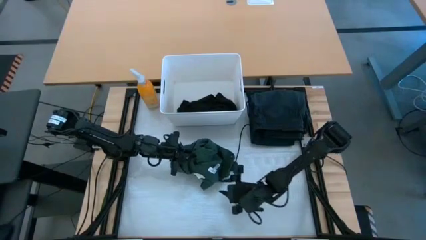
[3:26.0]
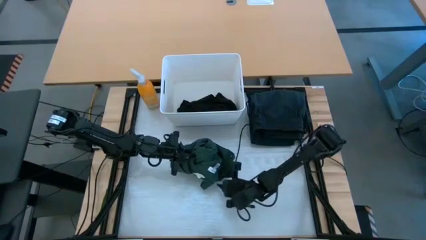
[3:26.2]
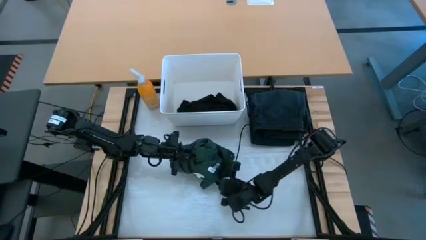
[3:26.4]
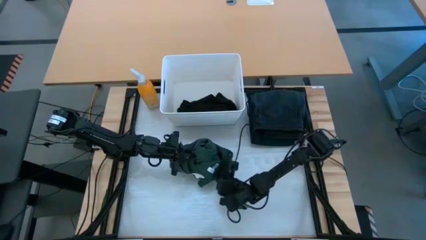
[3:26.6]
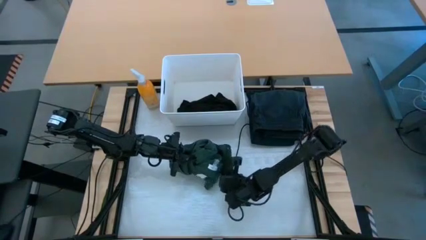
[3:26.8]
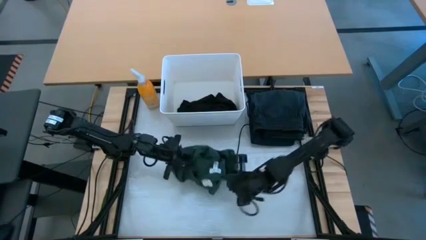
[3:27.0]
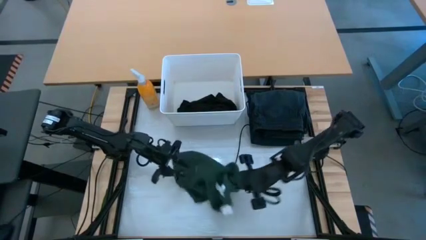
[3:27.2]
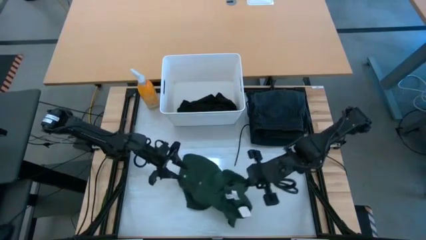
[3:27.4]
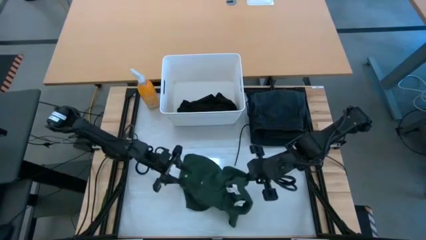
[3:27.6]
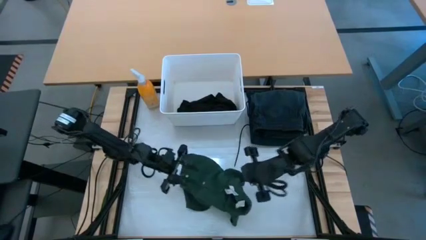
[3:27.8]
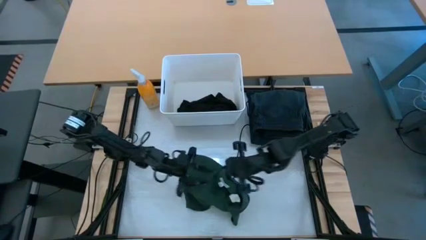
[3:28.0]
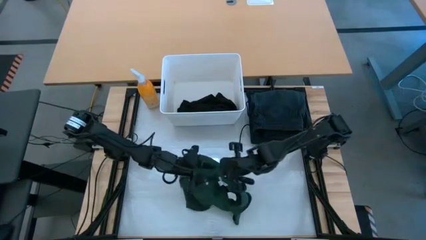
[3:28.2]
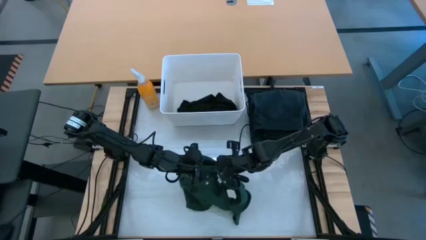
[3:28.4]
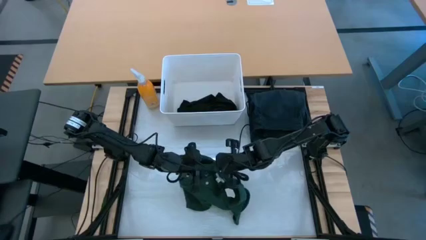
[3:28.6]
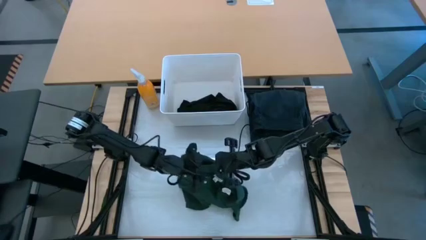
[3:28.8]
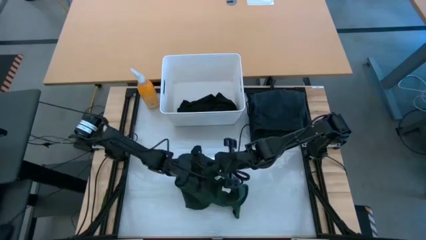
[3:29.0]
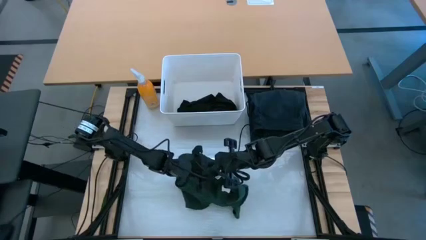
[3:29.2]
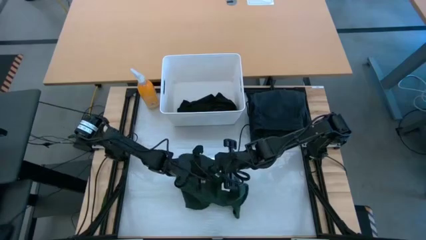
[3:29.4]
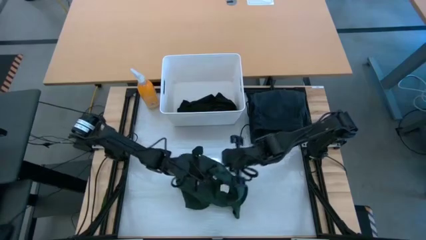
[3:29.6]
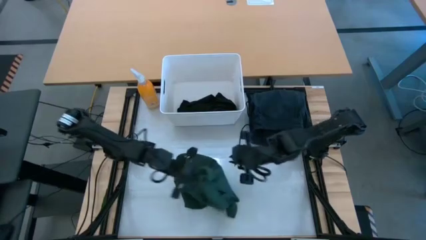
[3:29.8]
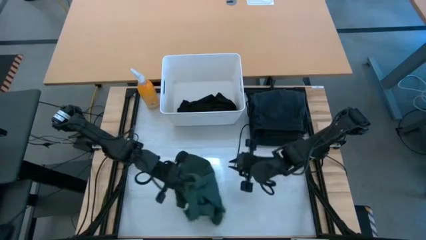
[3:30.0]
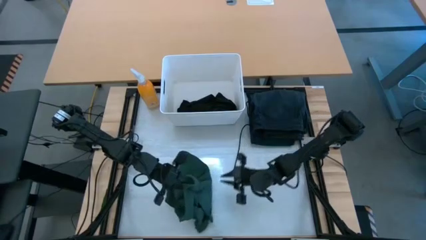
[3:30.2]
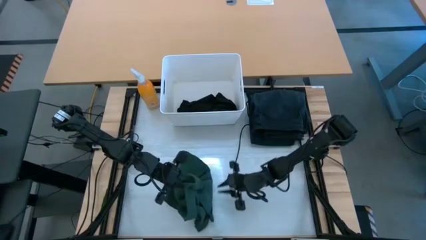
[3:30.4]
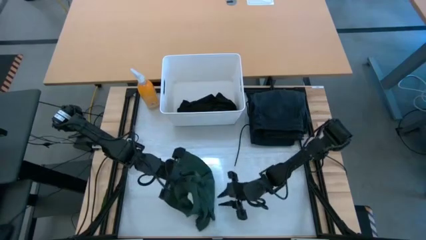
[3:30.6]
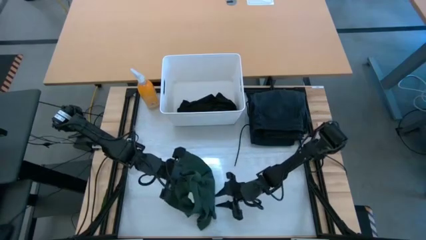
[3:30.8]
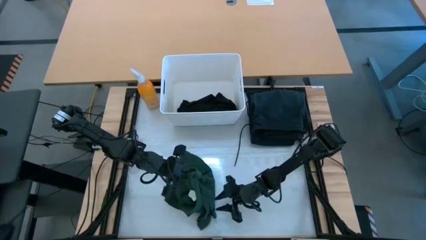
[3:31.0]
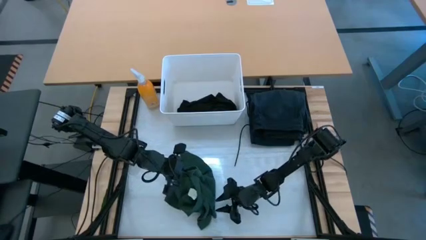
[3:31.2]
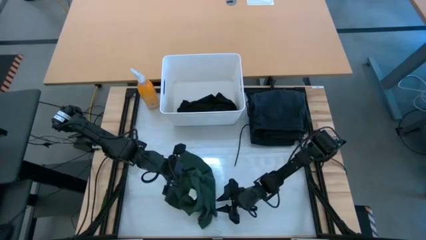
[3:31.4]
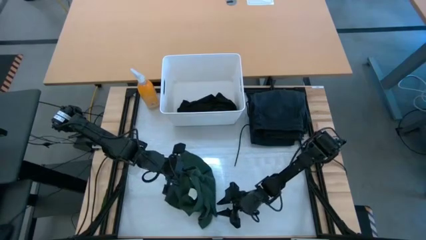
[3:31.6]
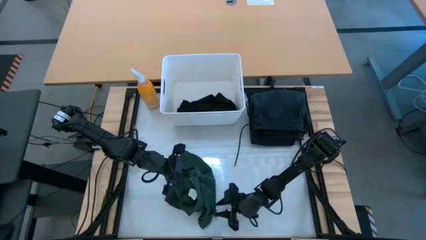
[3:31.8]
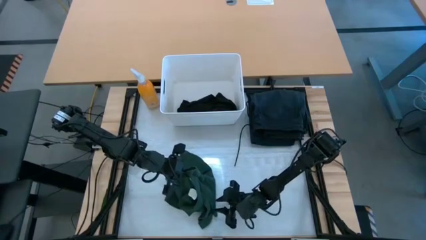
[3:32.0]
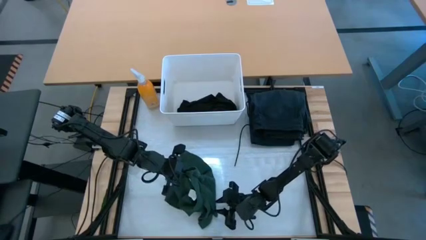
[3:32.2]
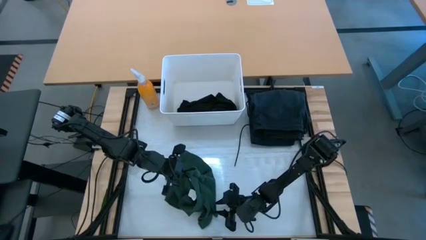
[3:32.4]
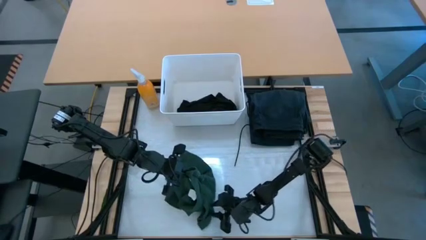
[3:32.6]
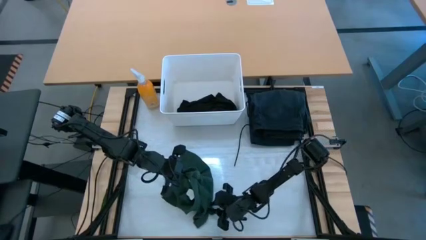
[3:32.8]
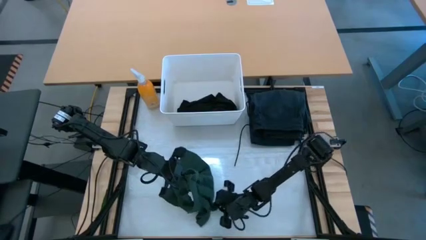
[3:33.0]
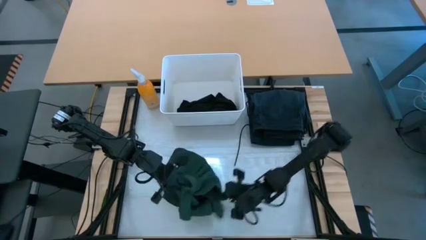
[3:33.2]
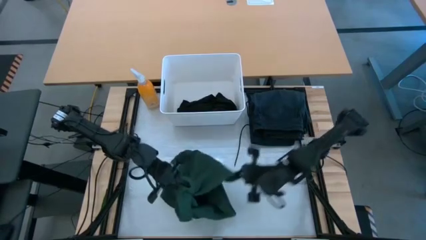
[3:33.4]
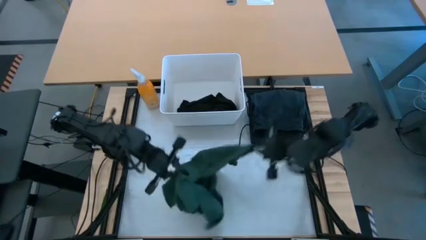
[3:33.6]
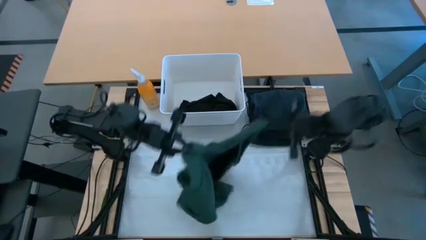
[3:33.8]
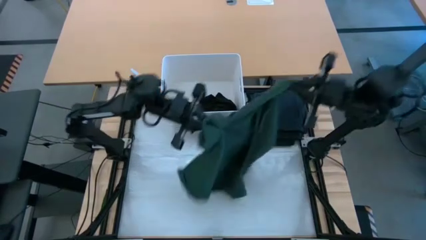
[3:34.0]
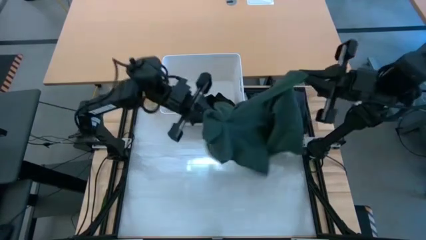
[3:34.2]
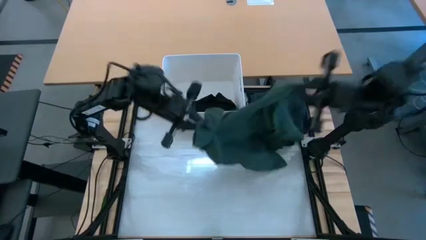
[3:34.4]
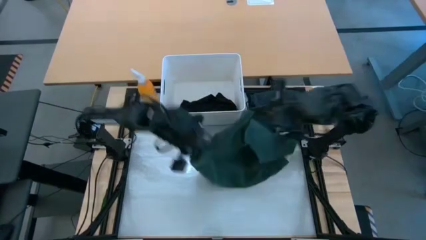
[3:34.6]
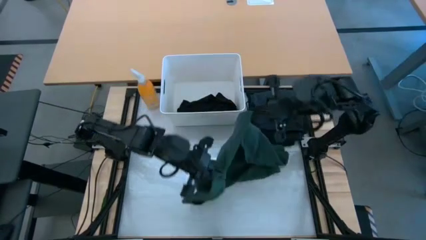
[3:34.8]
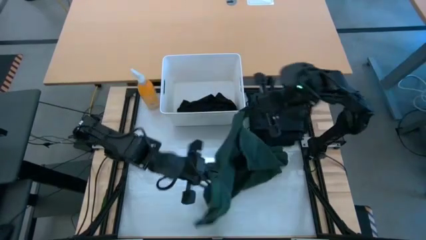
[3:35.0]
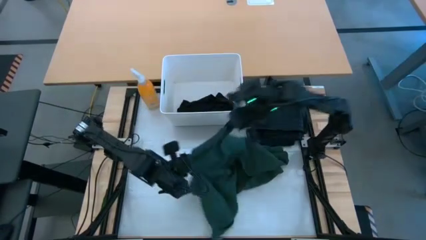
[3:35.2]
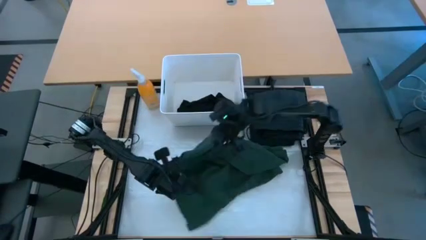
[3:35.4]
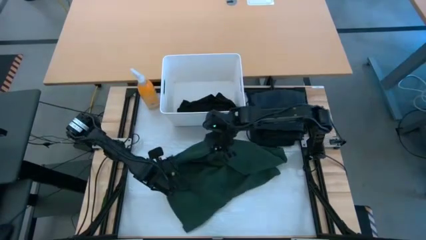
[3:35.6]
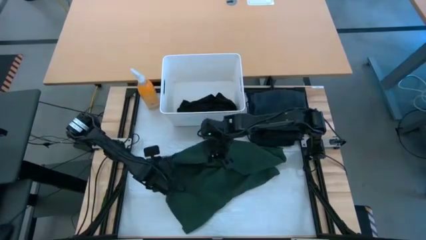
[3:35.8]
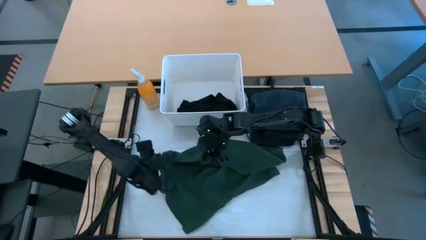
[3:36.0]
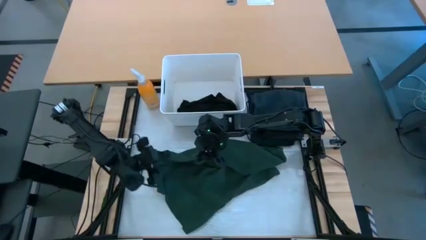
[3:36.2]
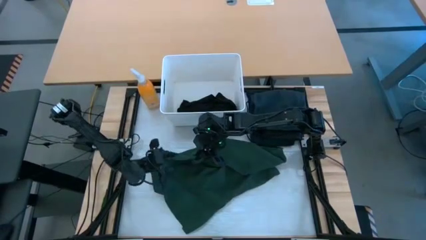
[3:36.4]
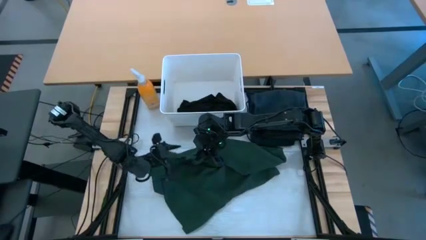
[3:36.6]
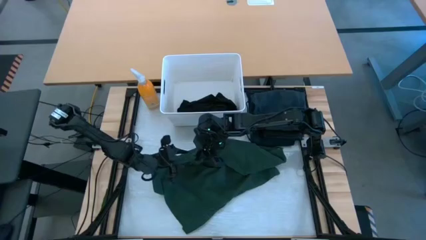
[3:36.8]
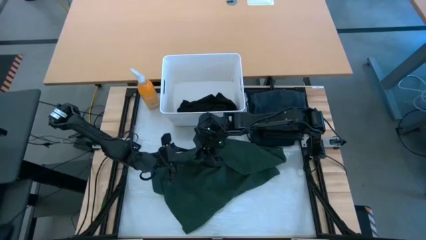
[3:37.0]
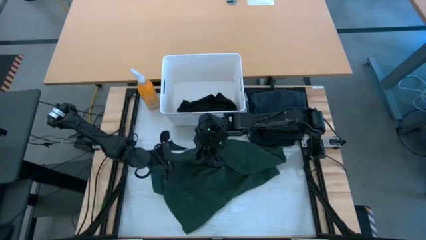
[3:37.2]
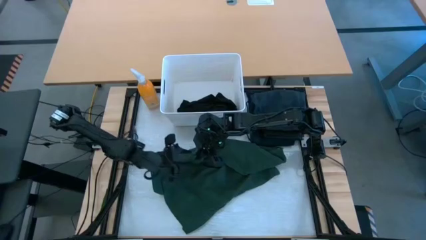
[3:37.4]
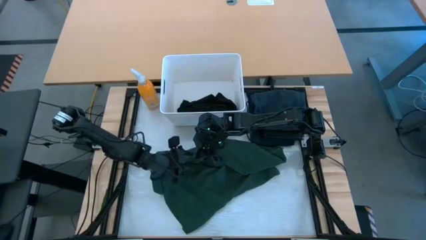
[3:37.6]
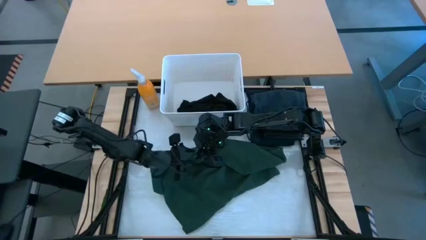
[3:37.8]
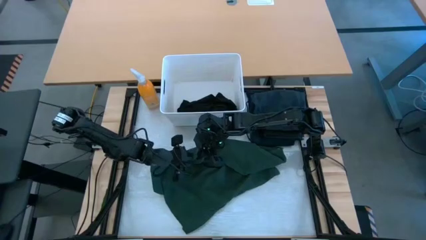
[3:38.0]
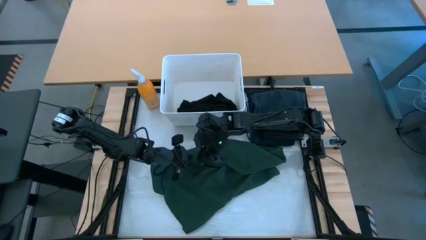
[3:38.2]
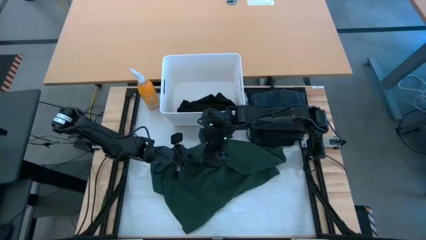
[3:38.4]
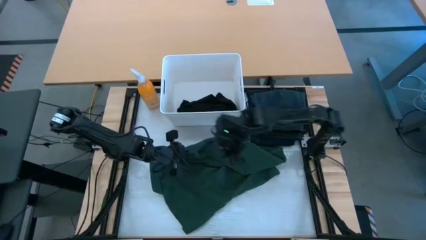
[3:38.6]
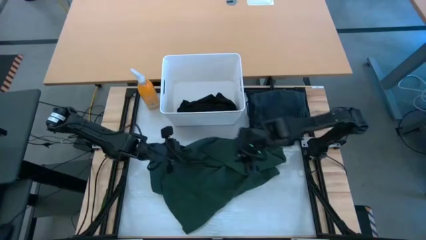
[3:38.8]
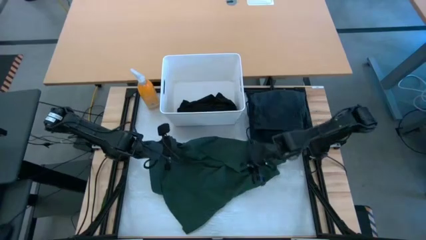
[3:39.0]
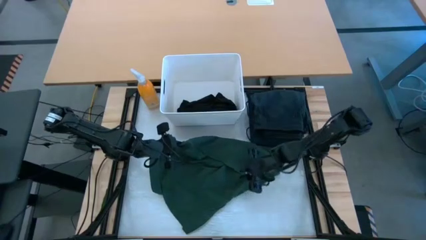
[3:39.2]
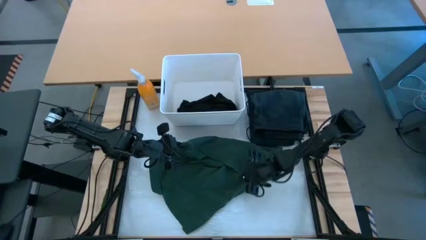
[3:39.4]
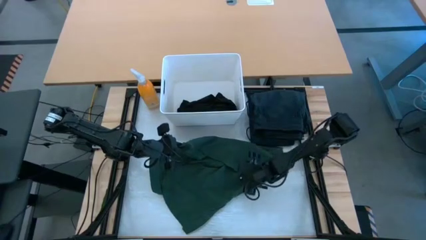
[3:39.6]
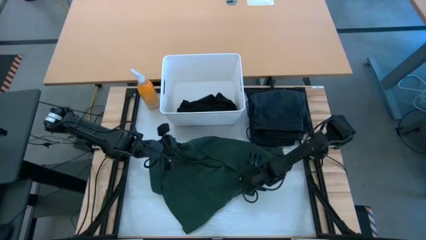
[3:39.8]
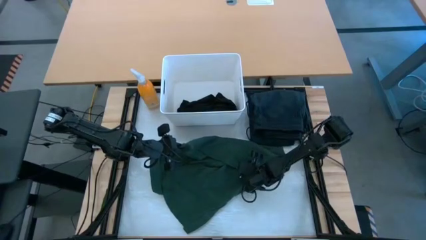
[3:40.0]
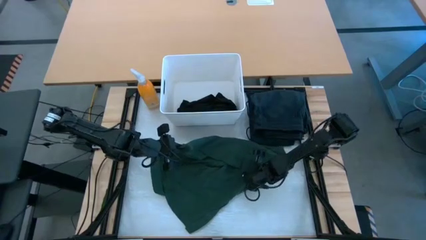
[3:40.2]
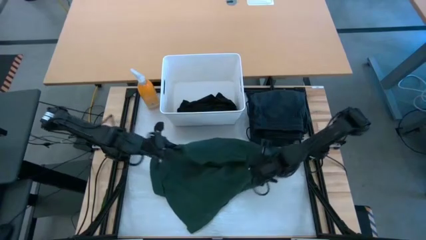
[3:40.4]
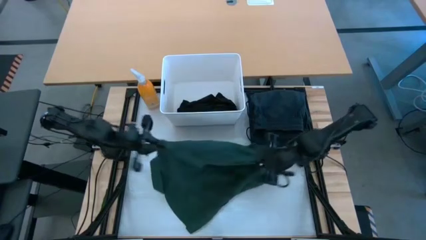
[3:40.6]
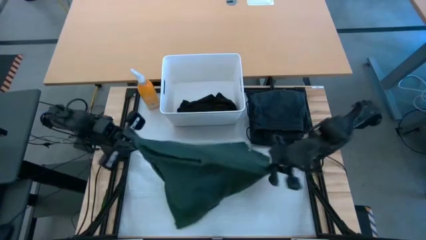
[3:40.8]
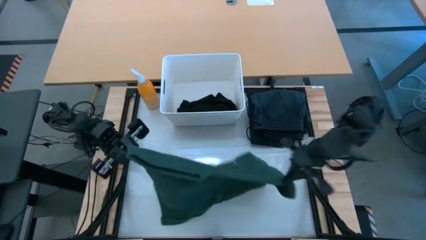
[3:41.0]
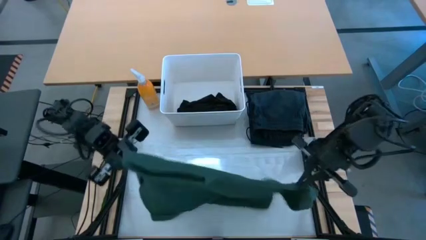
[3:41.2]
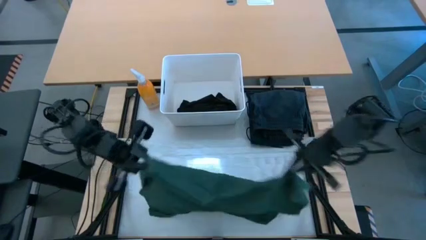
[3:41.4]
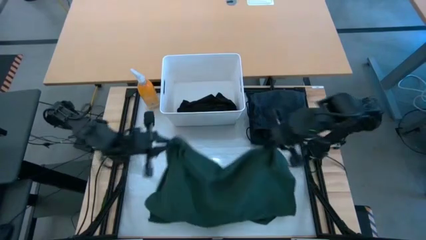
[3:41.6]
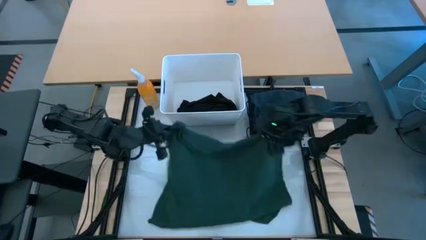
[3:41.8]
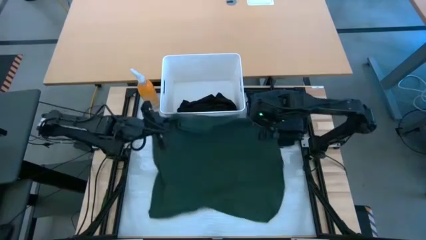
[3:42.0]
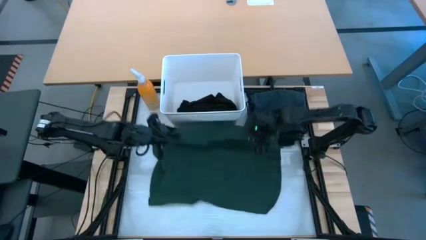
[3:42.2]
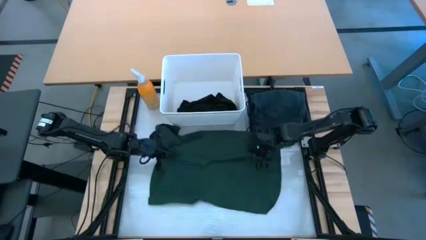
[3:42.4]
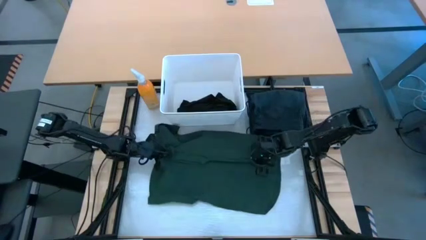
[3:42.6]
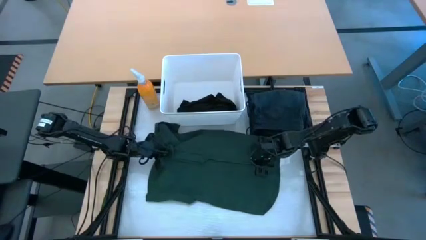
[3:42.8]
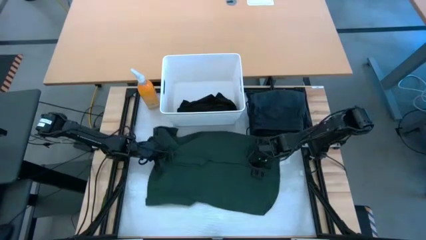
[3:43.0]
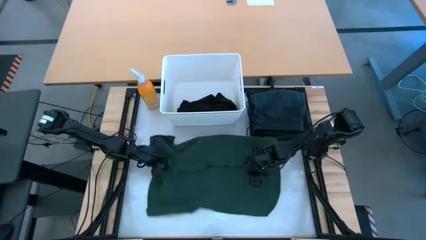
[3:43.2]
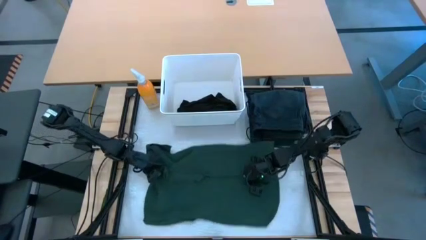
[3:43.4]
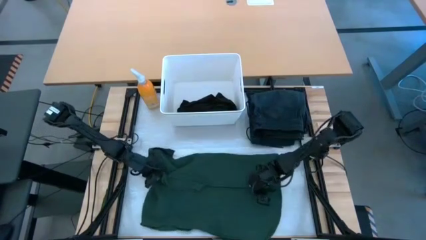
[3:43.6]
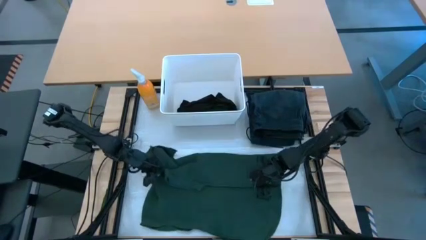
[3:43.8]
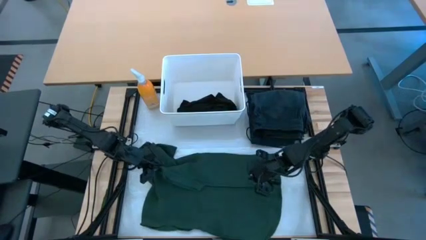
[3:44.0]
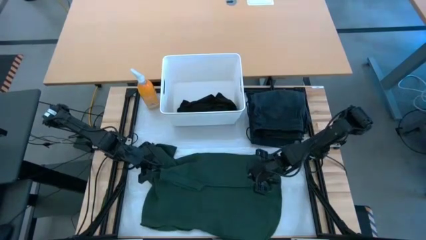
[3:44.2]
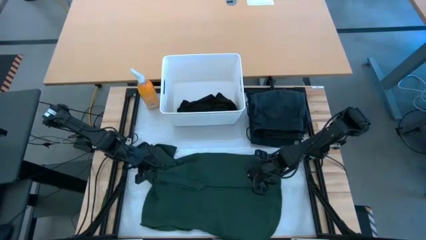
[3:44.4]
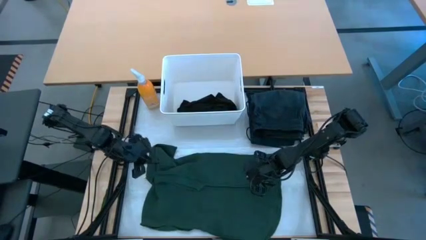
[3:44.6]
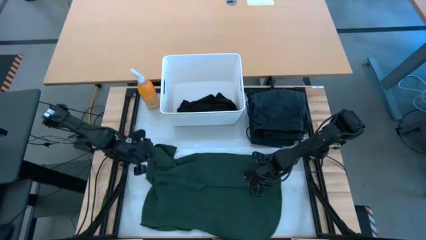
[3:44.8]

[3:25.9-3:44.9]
Task: Fold laundry
Fold the green polo
